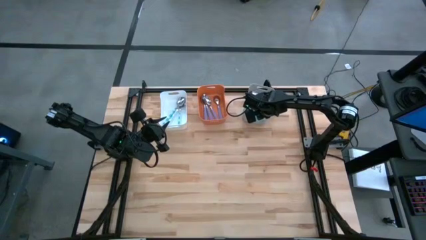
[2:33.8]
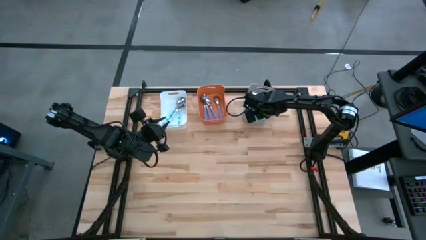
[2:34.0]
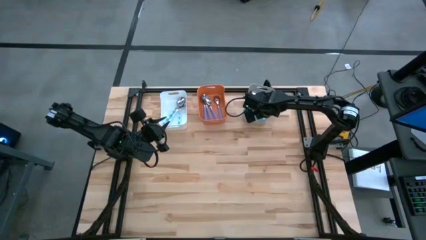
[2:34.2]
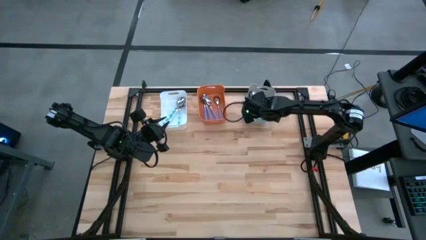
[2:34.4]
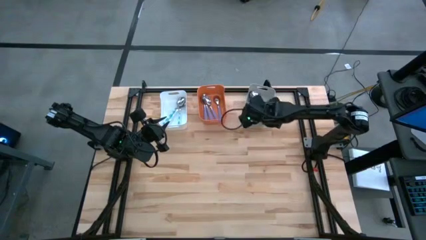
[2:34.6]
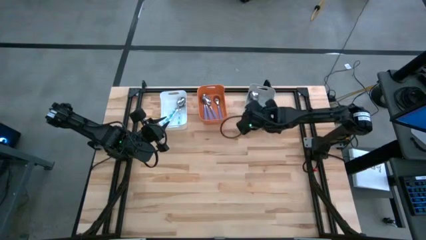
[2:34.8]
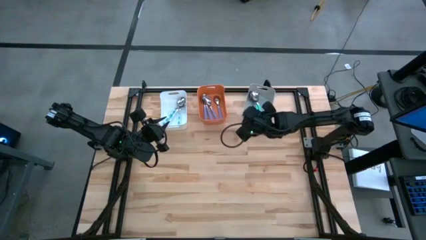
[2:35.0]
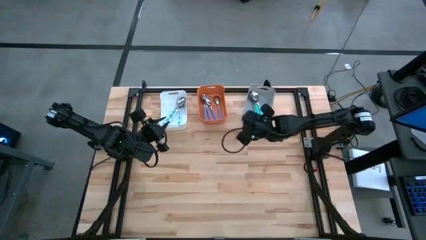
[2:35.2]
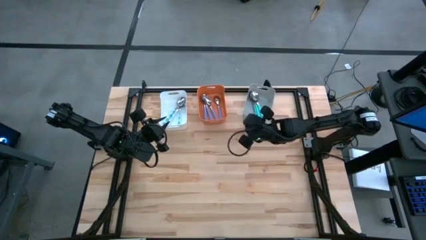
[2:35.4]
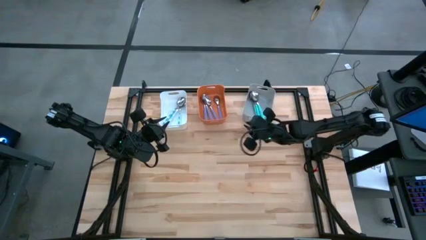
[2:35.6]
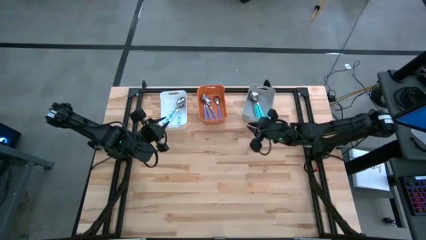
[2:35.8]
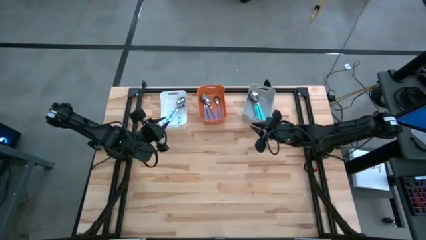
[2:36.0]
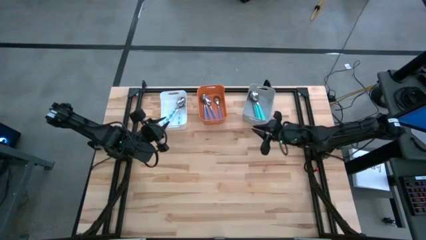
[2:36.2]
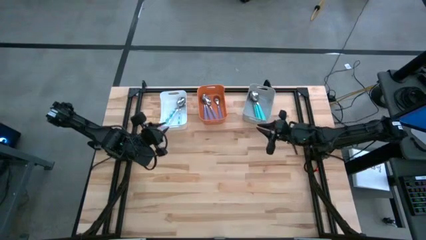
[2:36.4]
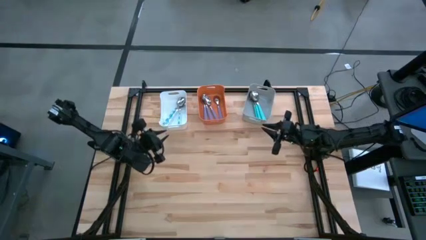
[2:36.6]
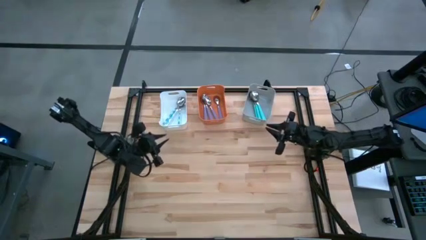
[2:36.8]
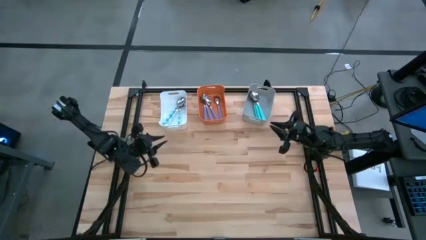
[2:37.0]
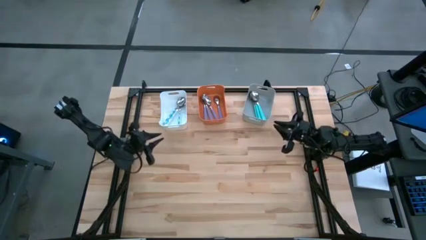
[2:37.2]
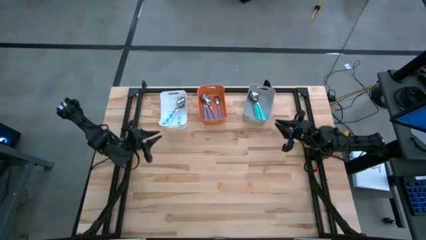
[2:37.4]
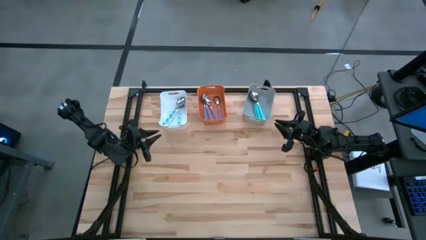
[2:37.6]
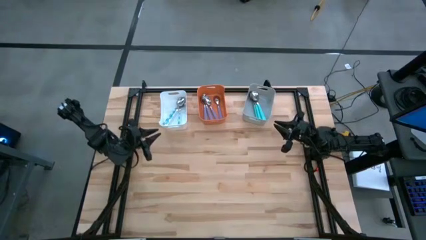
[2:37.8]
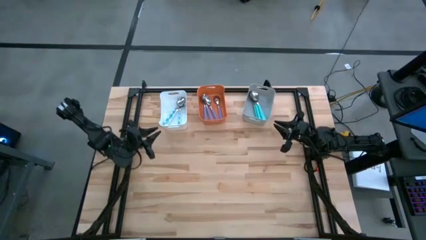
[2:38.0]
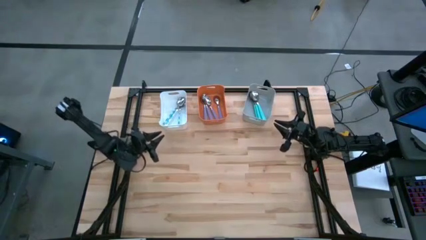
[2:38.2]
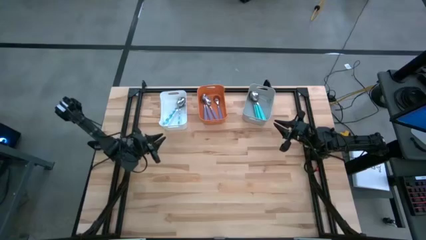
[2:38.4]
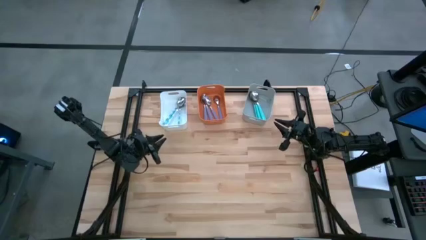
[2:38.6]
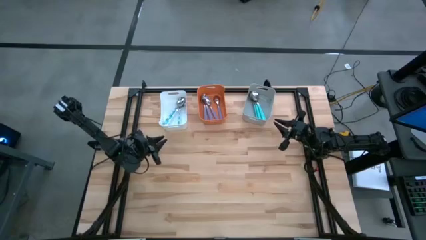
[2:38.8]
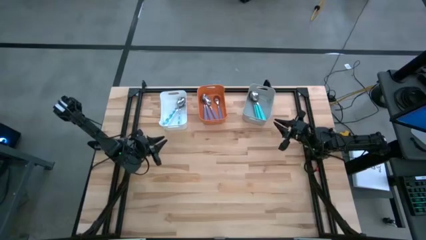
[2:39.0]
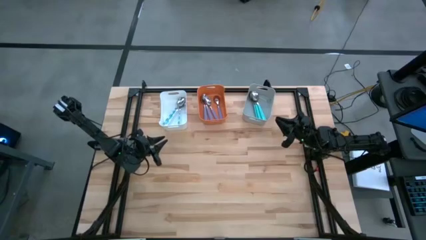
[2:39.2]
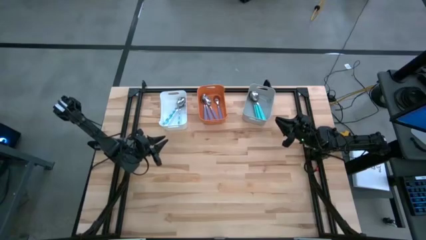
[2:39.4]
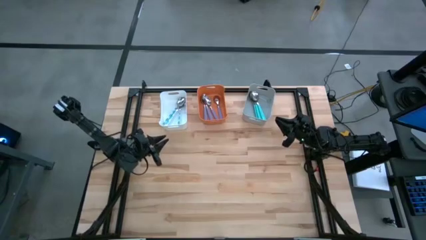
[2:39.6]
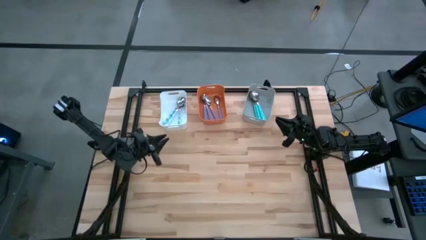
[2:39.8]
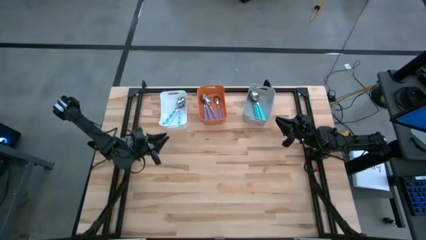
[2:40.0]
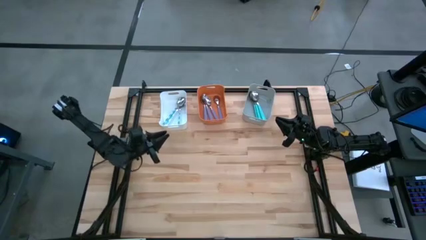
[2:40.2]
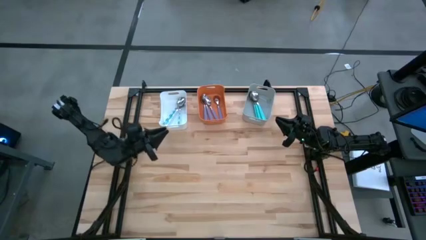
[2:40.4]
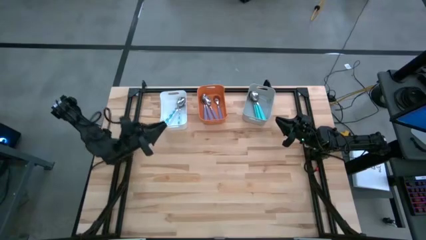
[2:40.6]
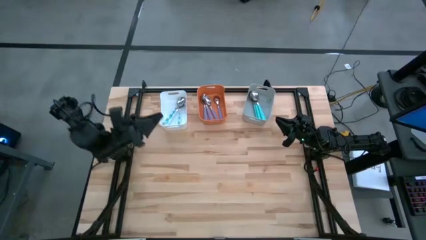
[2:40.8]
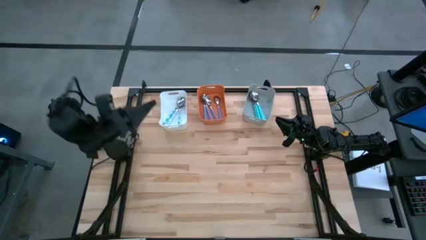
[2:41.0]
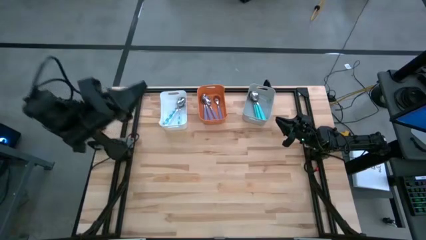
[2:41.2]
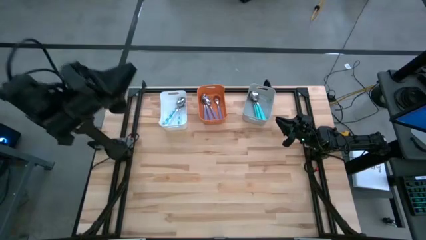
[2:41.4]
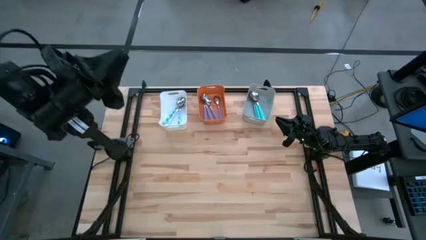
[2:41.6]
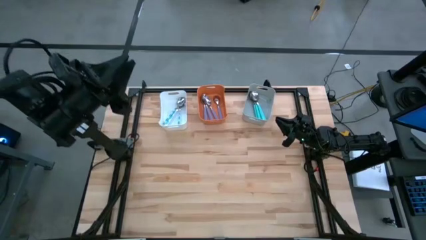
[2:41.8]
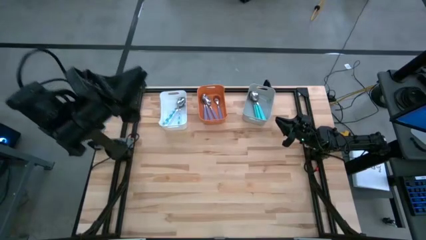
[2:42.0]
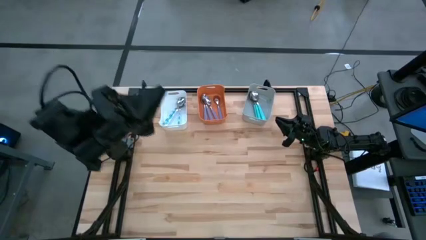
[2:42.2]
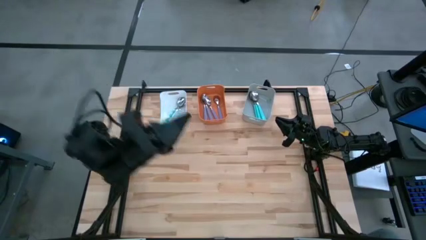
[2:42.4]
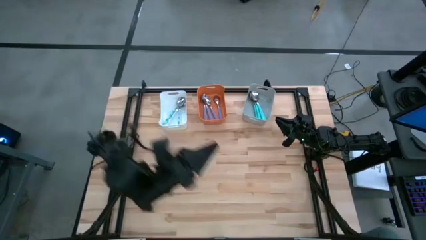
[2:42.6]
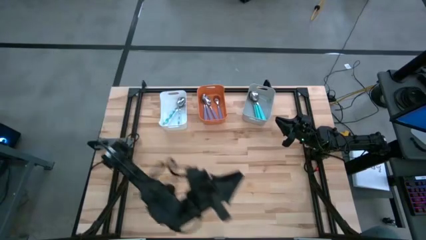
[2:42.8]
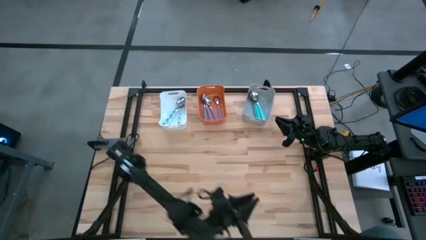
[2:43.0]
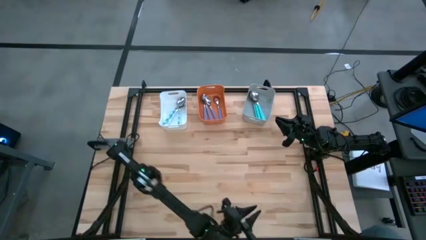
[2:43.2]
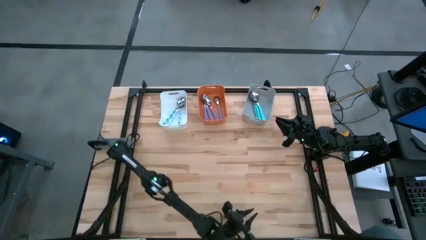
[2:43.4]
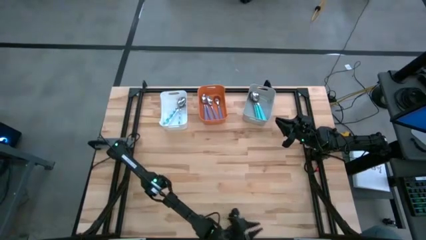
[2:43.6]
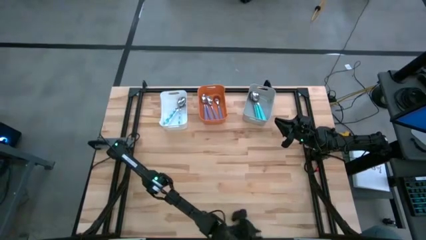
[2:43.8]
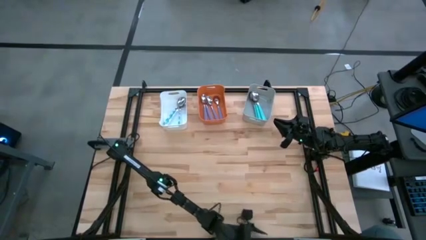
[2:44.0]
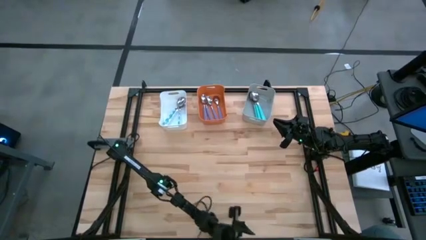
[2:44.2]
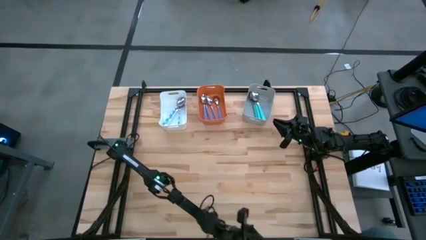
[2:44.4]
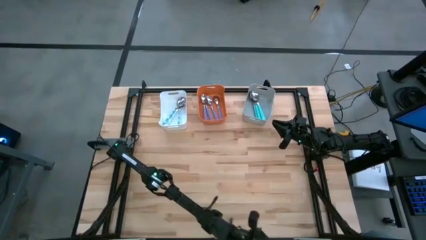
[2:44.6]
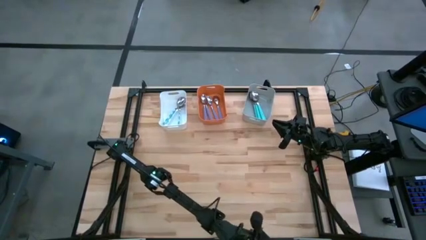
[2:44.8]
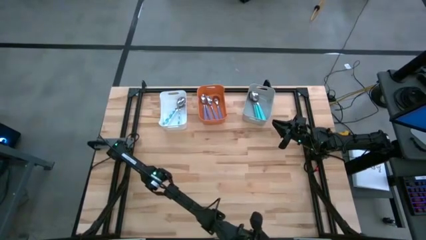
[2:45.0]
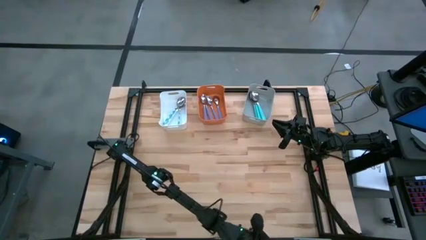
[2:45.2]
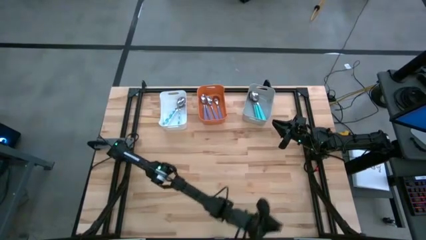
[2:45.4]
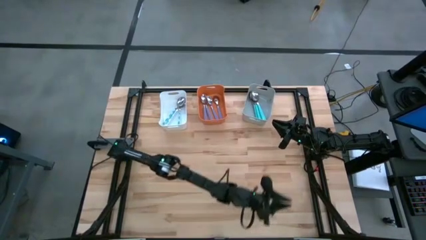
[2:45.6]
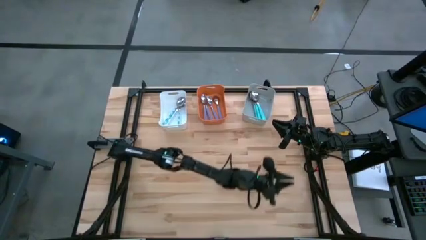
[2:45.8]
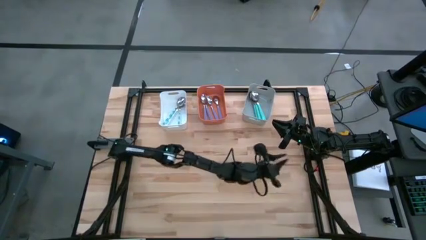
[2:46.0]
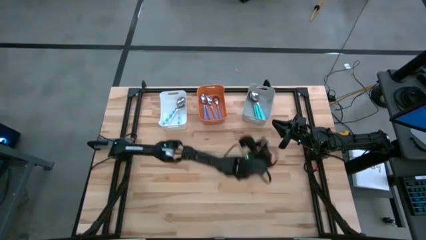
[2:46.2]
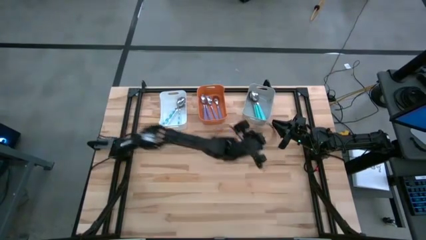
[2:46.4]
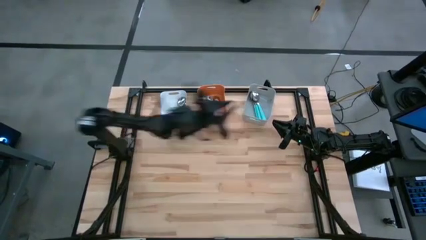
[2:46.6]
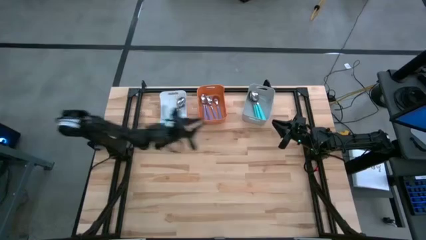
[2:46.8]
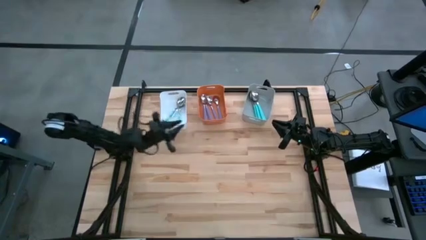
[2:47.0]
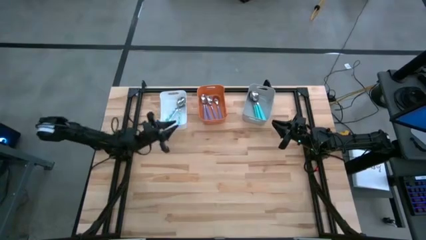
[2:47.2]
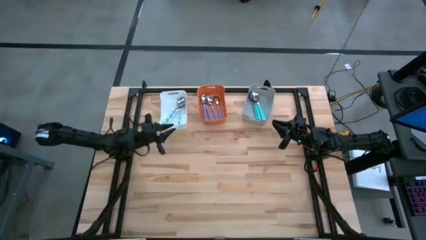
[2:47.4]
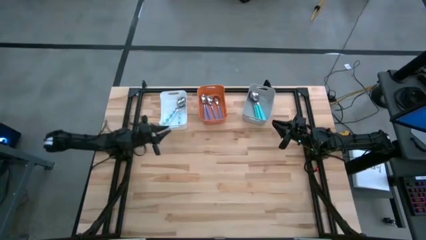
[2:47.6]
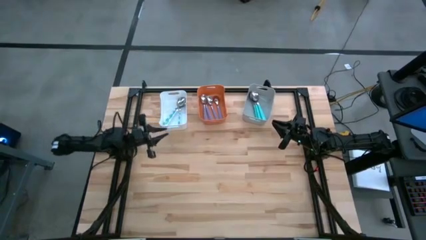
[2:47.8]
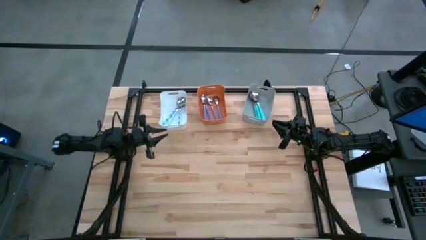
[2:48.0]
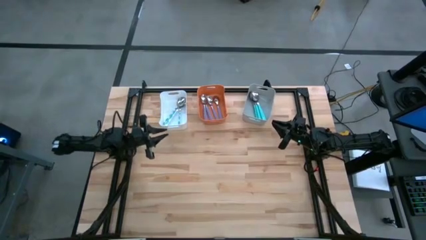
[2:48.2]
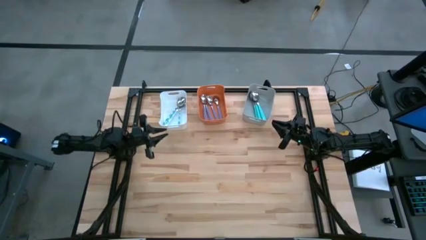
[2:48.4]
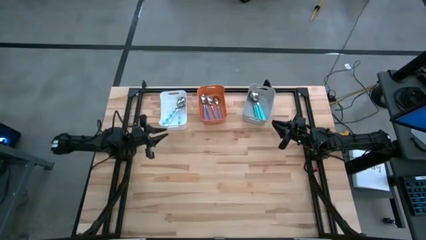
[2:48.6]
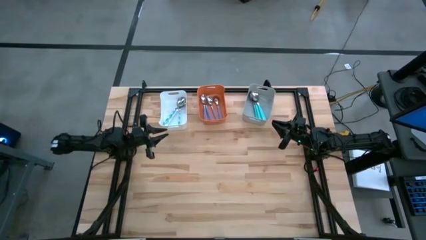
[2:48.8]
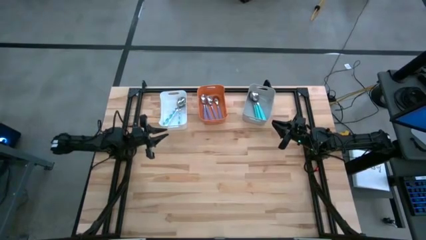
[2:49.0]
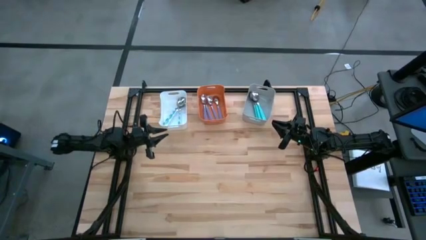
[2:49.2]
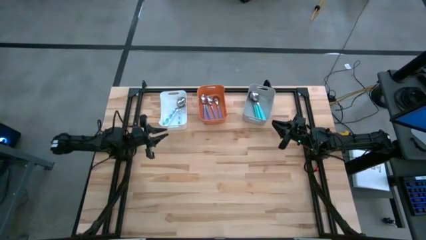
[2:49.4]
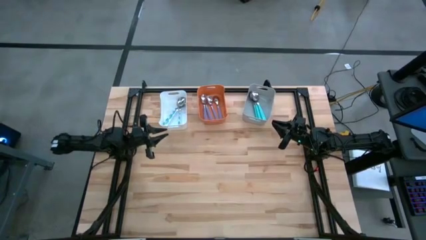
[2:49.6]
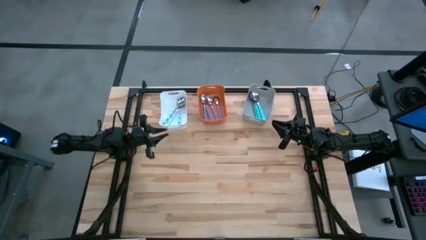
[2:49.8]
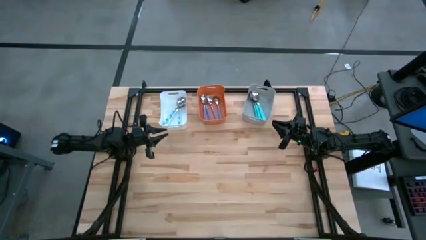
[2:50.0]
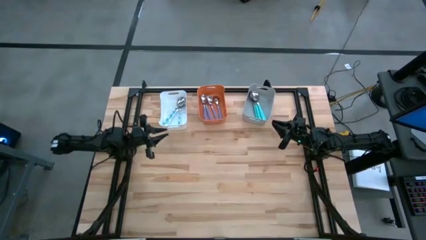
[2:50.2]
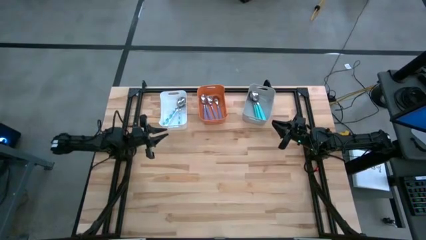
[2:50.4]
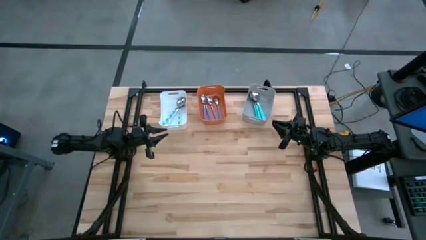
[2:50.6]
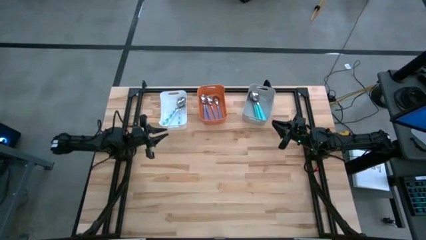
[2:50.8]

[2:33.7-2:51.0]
Task: Sort silverware by color (type)
Return to Home Position
